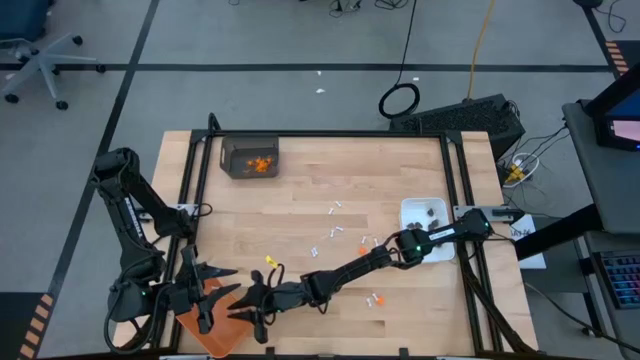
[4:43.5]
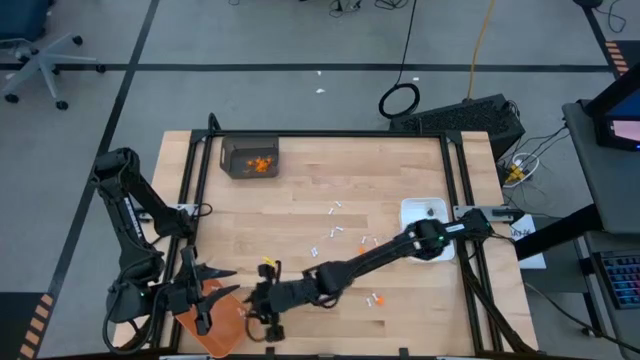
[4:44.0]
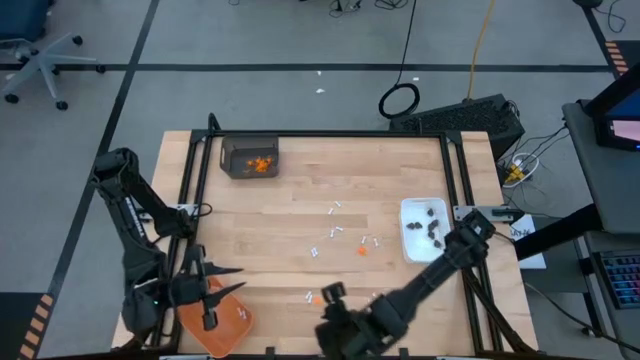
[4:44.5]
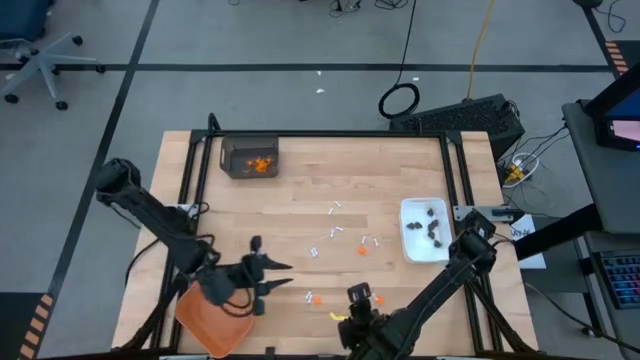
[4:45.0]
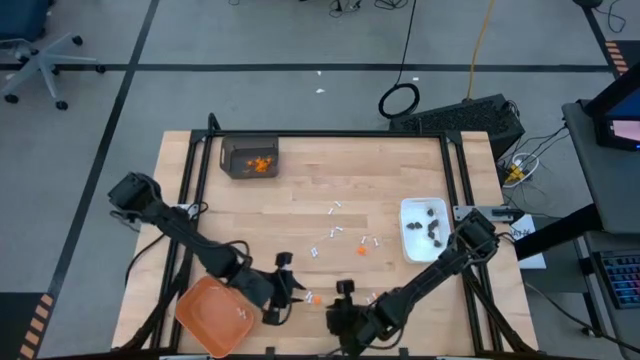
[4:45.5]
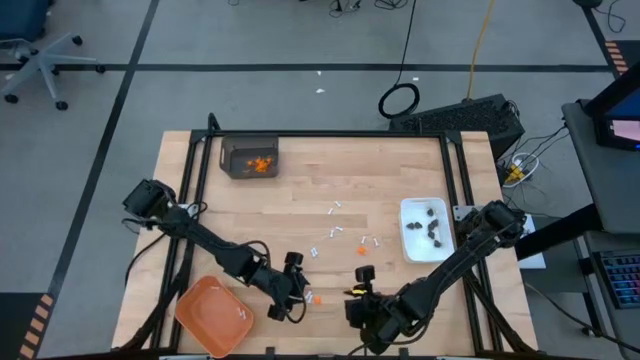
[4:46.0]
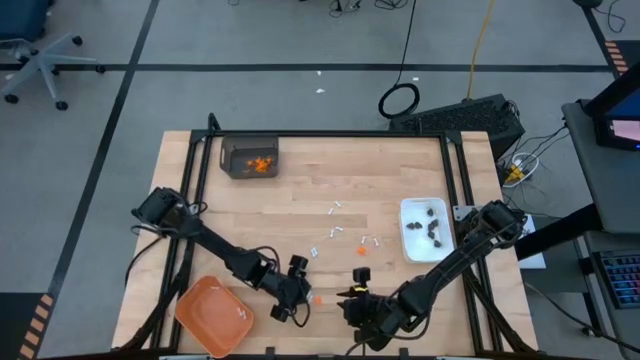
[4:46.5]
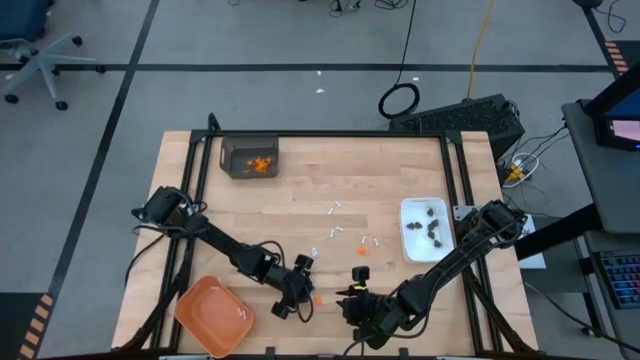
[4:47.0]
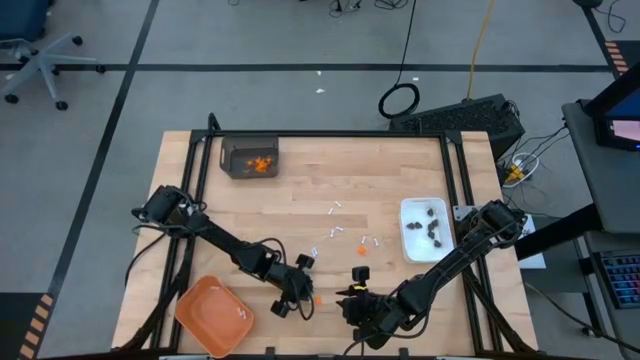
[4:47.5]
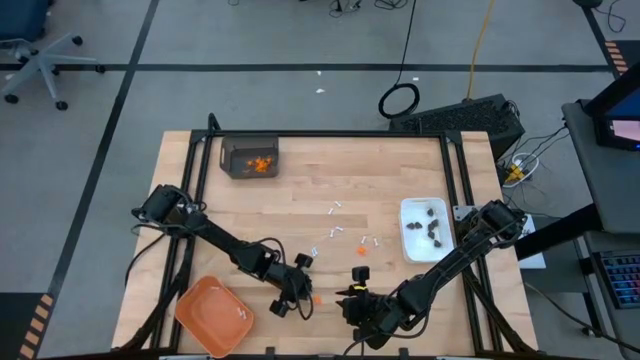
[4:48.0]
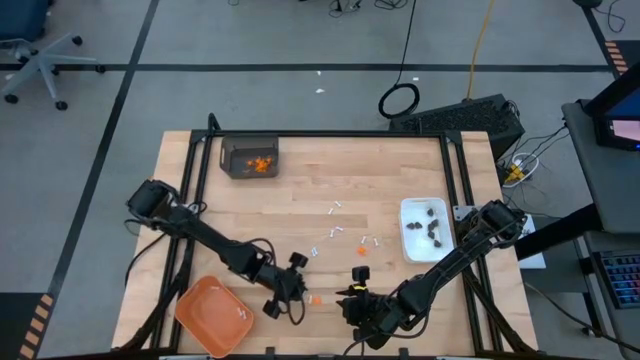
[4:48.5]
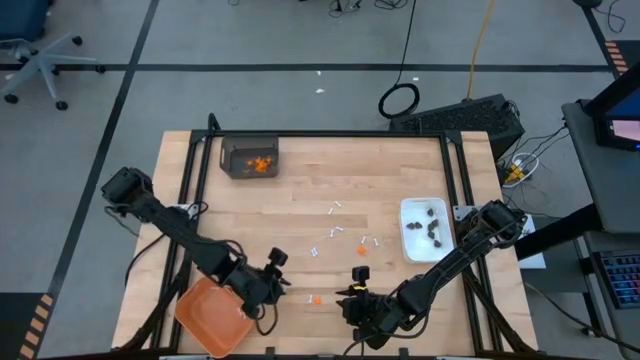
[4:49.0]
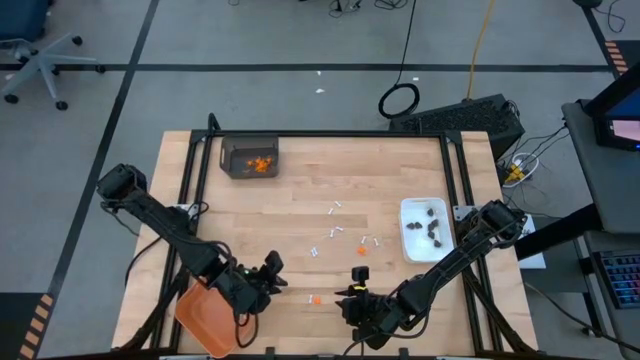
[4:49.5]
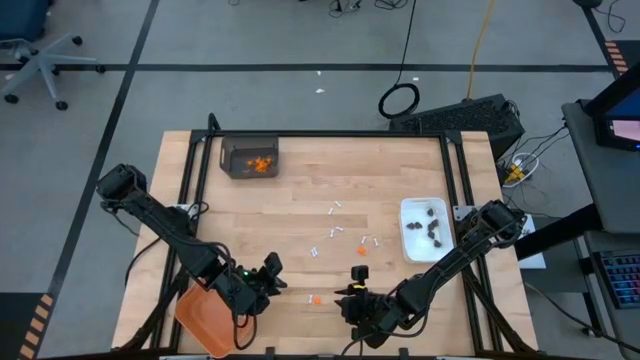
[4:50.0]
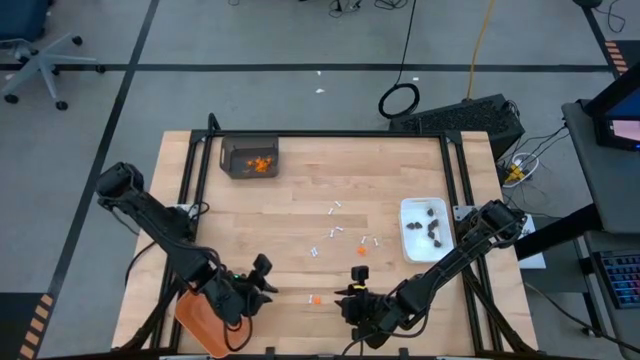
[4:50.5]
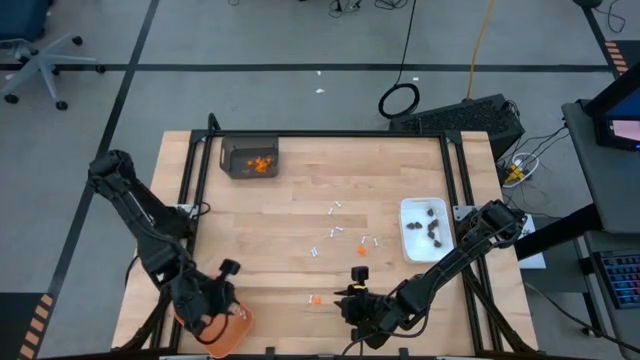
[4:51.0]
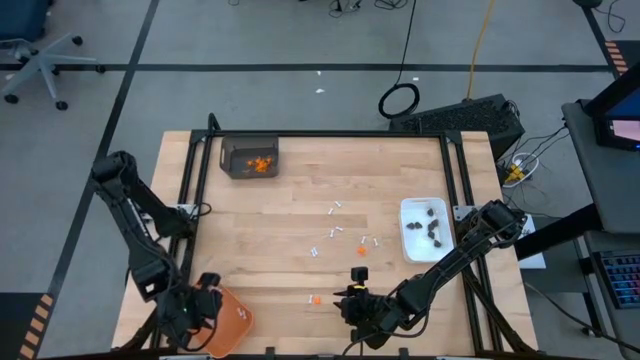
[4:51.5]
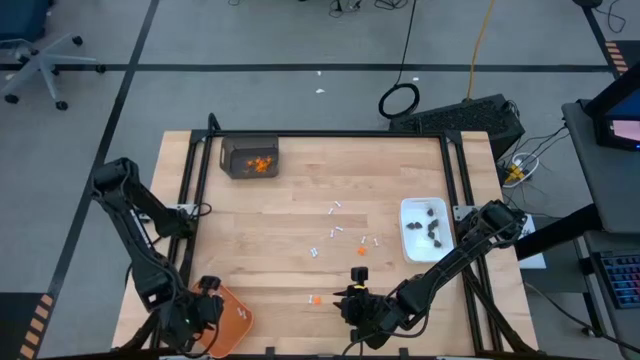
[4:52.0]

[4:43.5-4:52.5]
Task: Sort Halloween decoration
Put the white bone toy into the orange bin

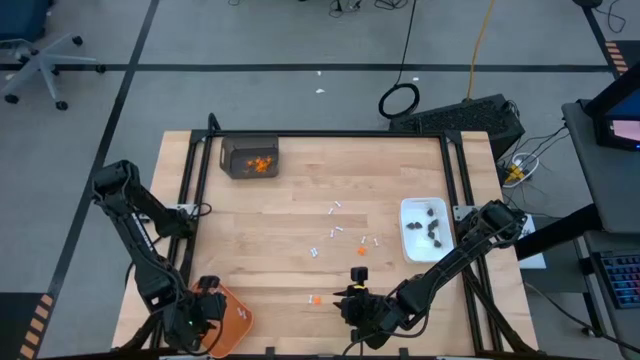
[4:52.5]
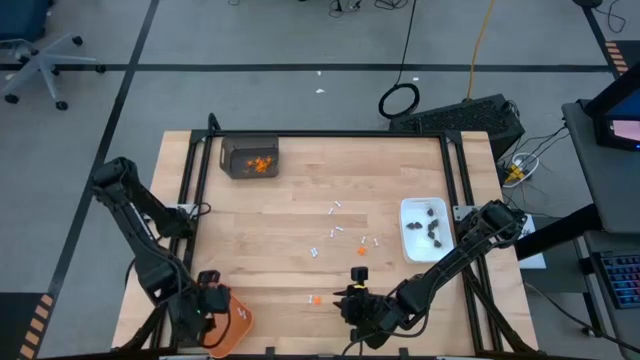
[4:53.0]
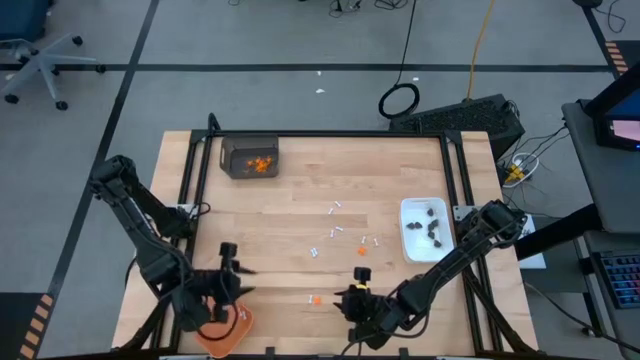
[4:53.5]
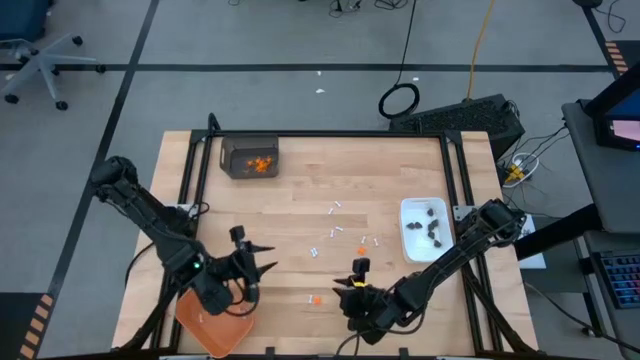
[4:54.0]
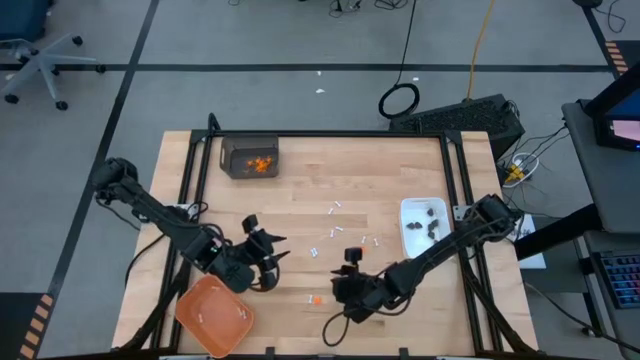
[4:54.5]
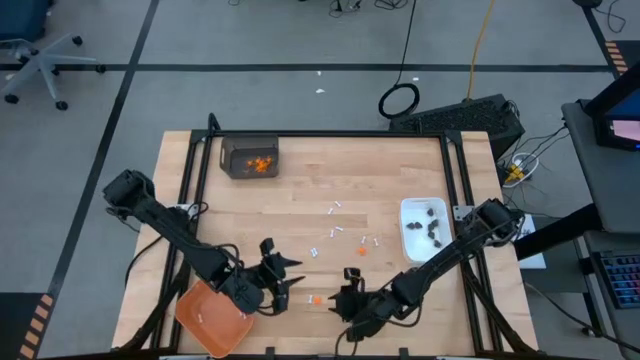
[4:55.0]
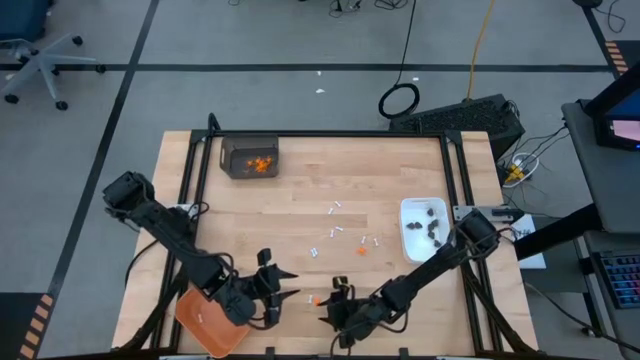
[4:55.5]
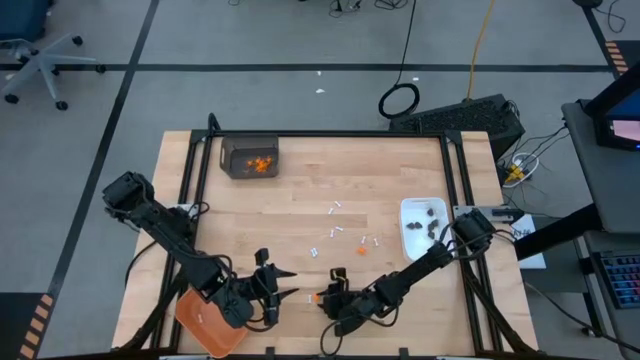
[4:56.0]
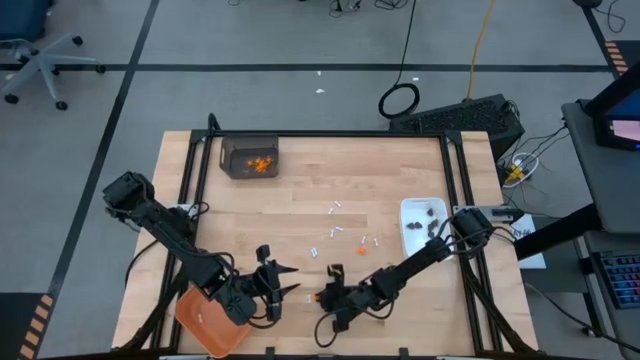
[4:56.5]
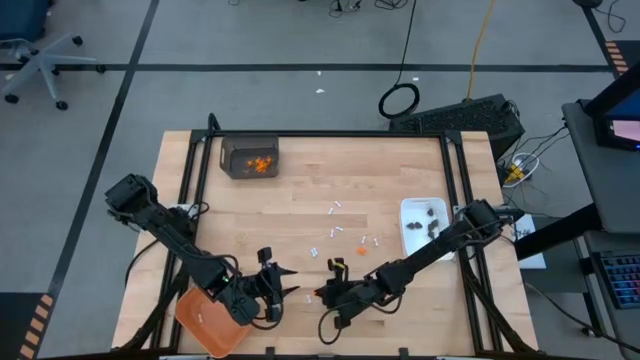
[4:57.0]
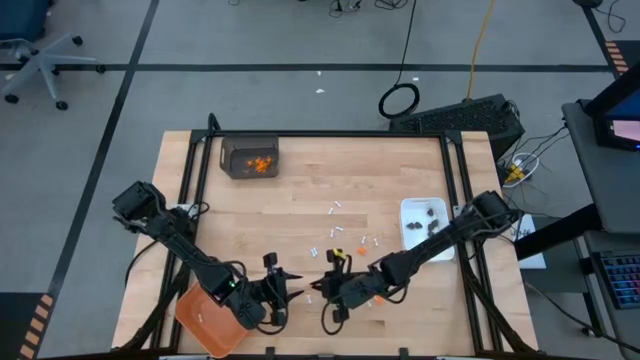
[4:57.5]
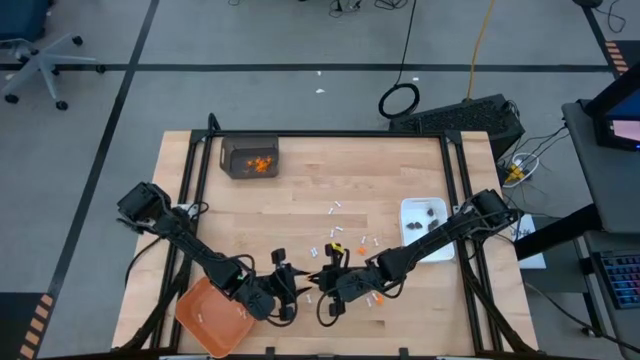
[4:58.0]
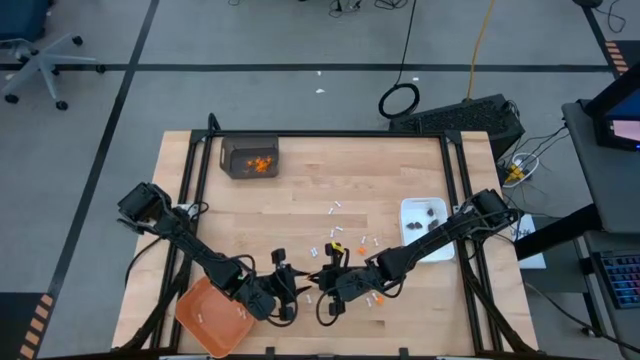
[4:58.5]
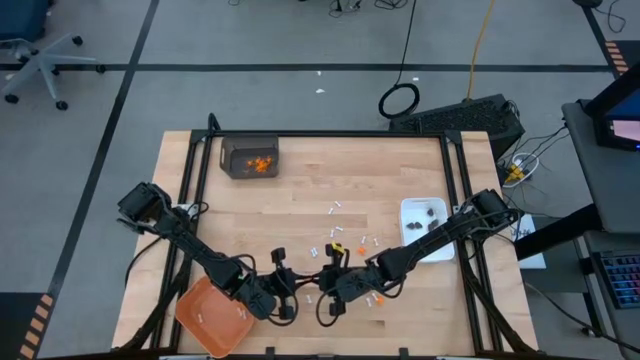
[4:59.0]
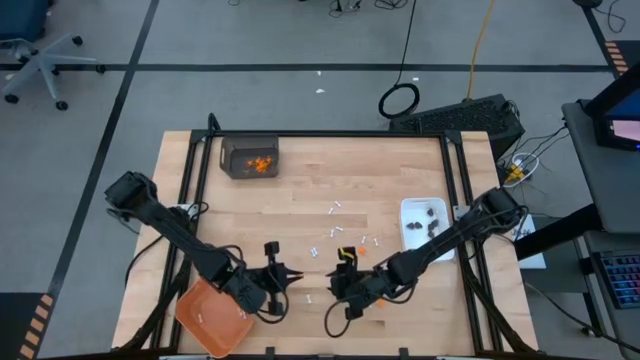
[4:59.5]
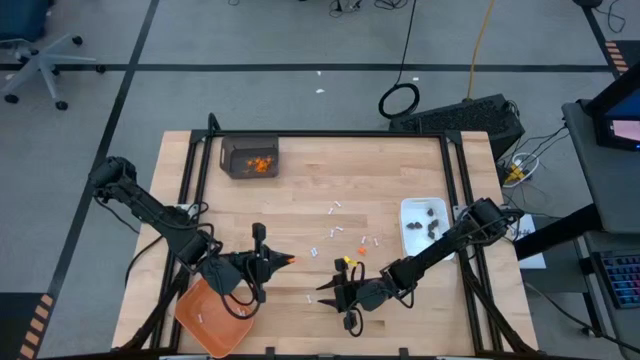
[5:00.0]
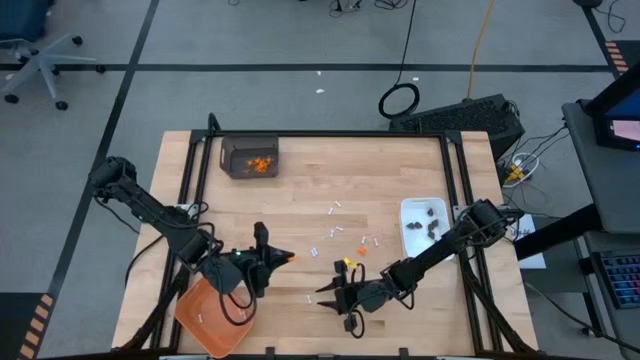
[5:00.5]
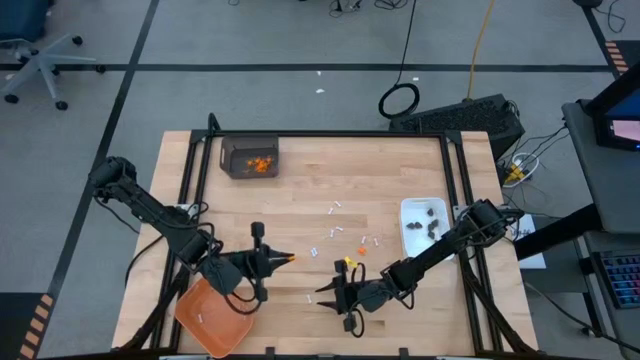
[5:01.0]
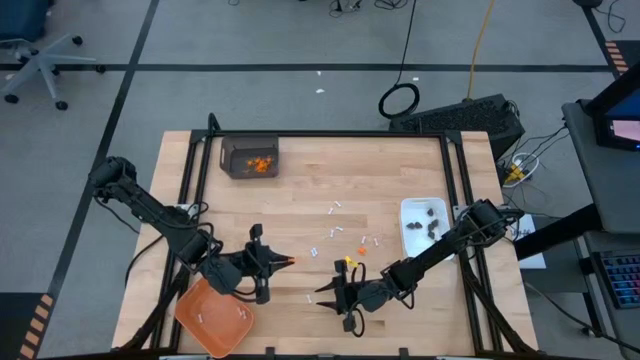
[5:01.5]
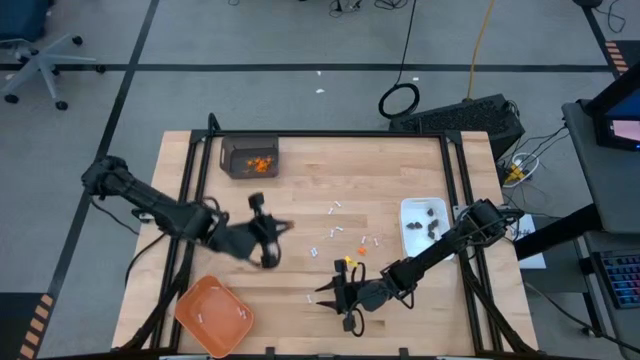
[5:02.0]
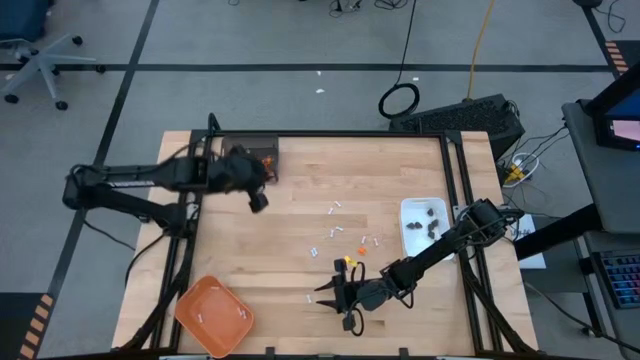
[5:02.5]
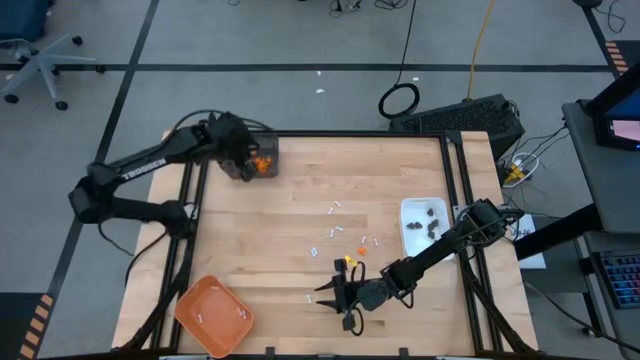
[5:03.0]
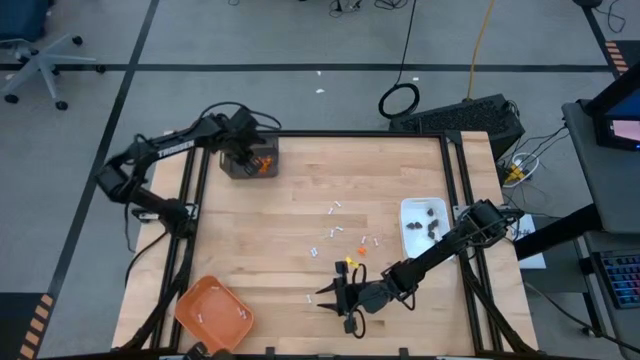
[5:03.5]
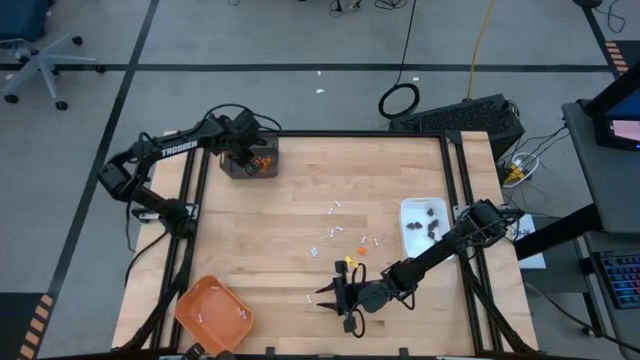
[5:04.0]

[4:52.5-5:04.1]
Put the orange spider toy into the black bin
